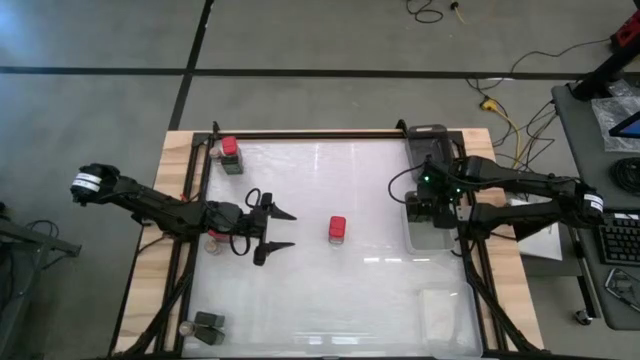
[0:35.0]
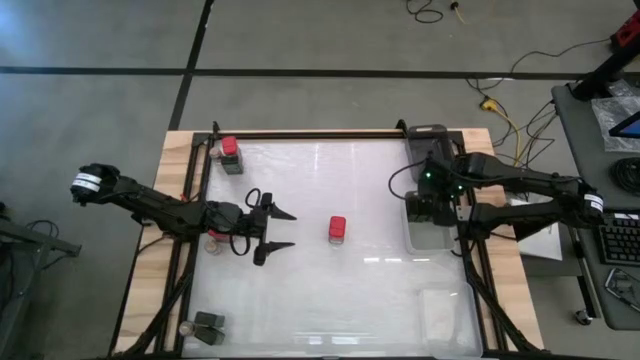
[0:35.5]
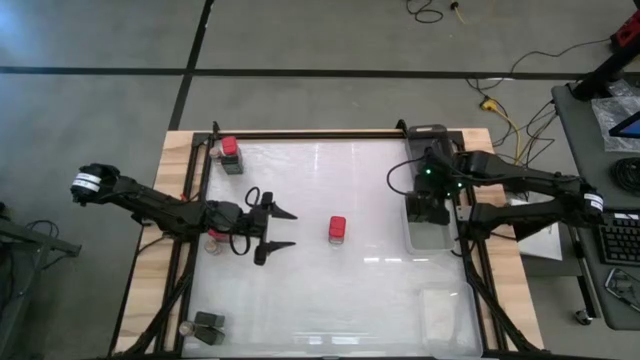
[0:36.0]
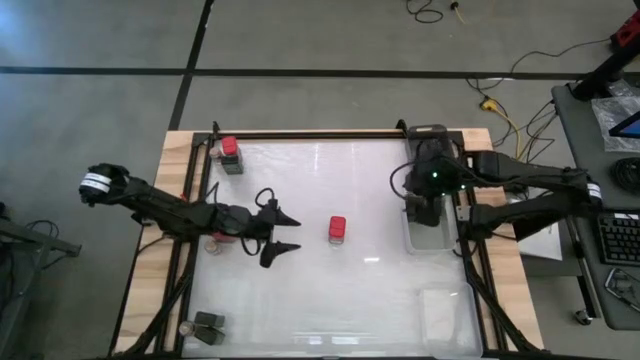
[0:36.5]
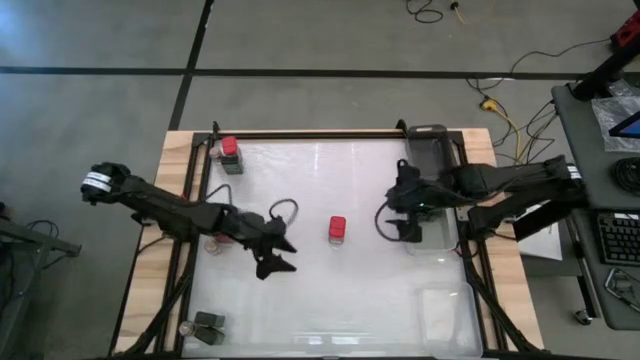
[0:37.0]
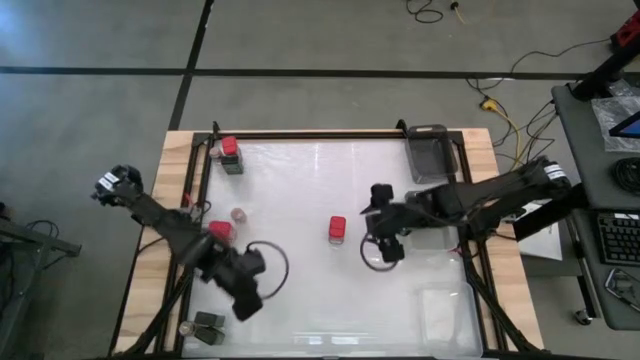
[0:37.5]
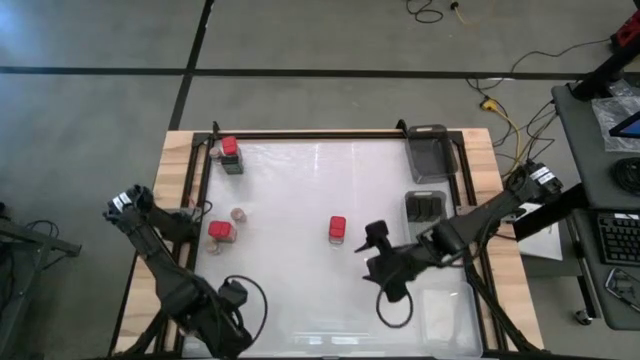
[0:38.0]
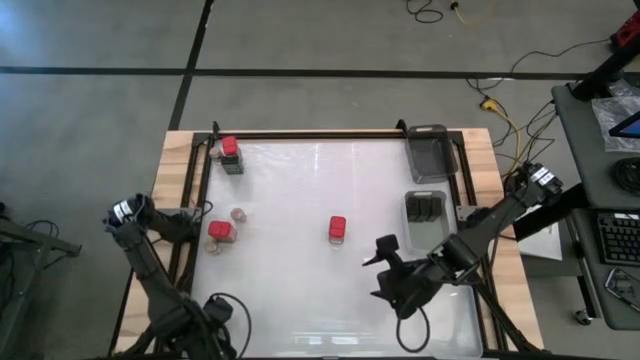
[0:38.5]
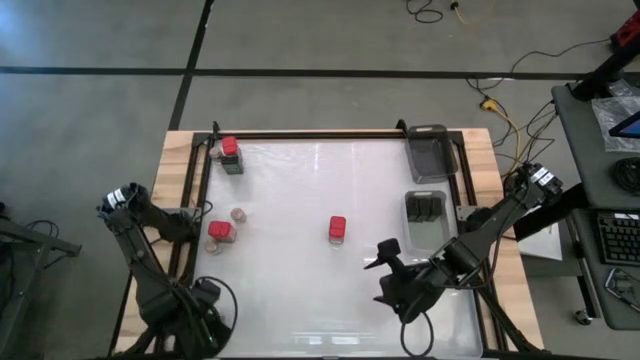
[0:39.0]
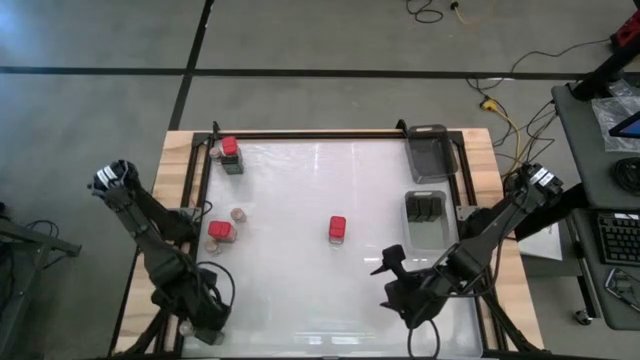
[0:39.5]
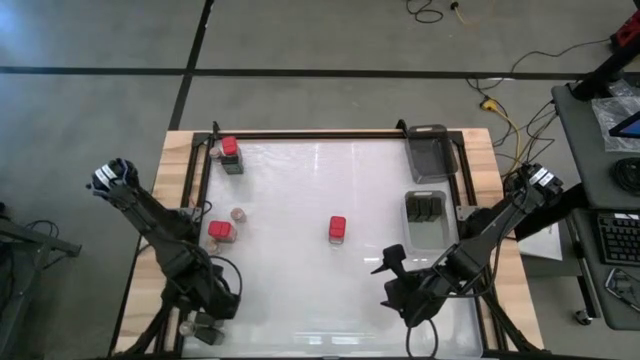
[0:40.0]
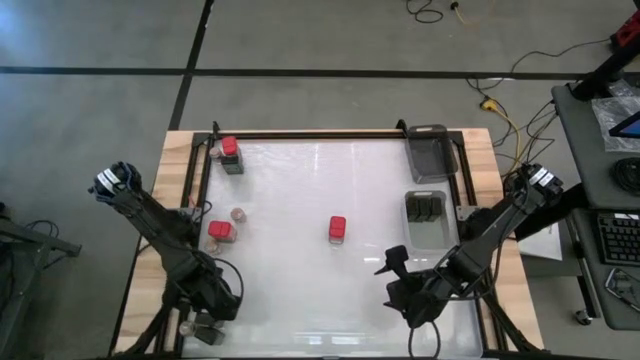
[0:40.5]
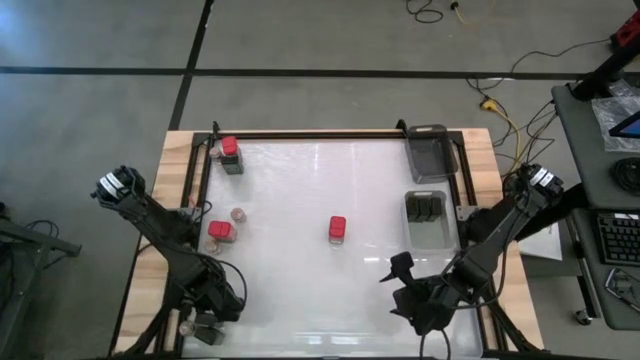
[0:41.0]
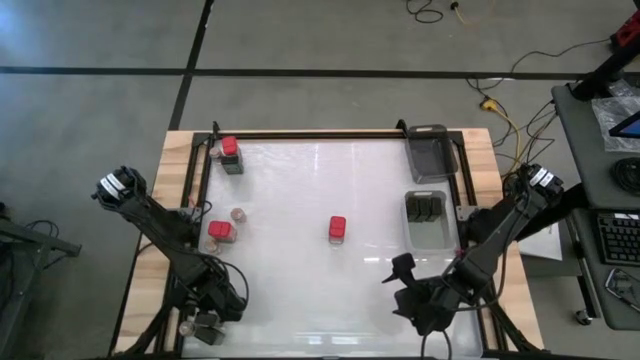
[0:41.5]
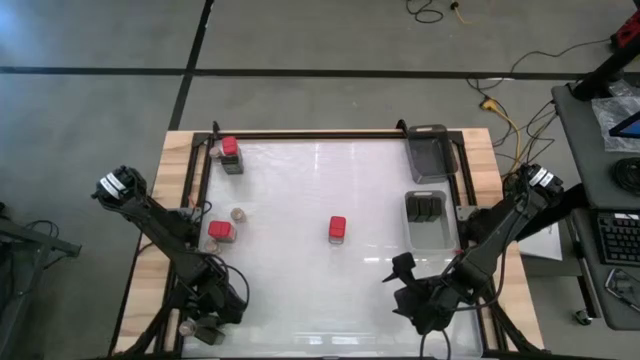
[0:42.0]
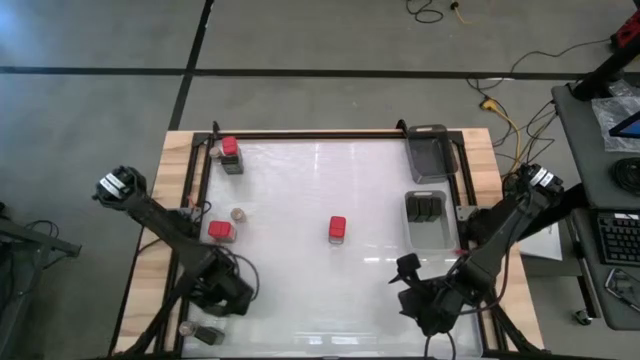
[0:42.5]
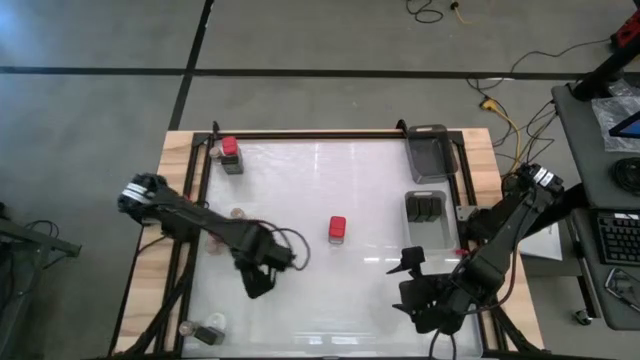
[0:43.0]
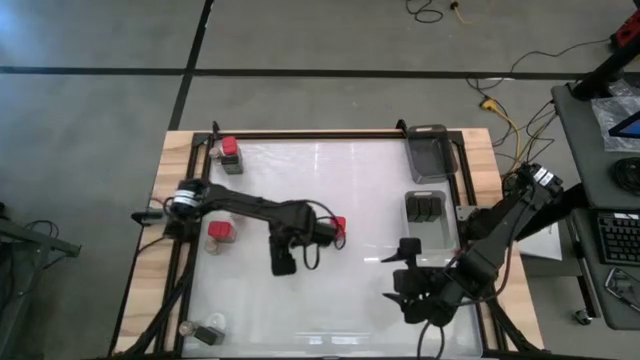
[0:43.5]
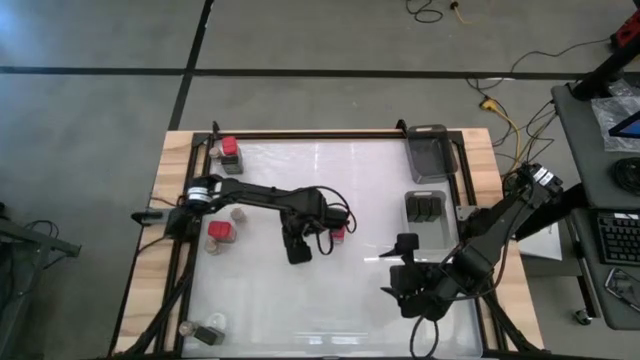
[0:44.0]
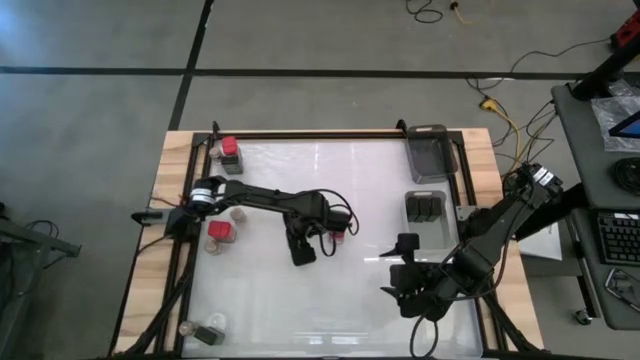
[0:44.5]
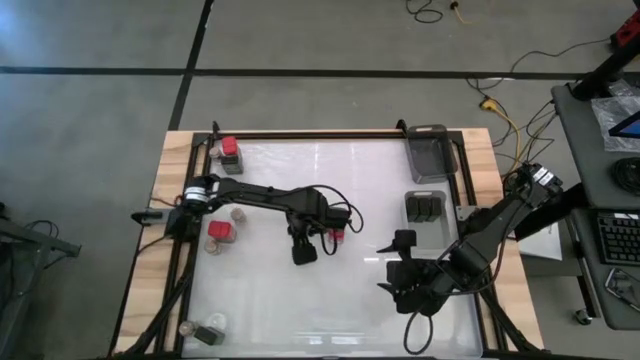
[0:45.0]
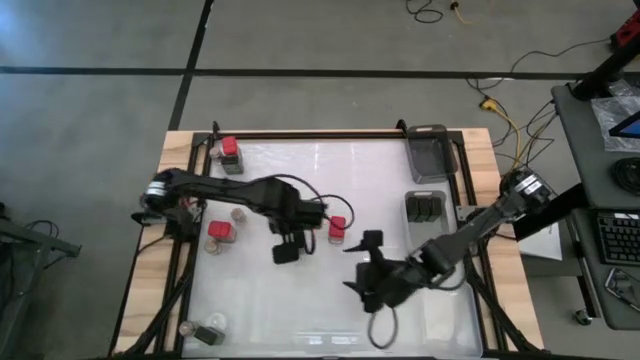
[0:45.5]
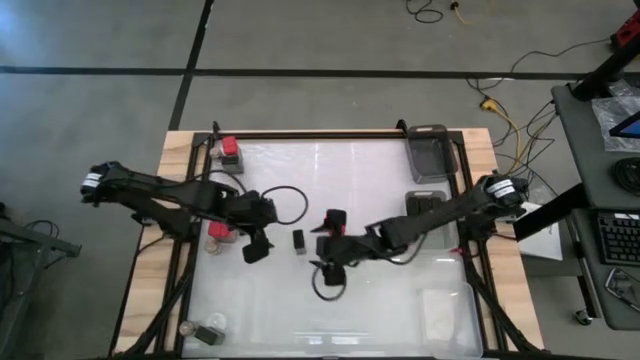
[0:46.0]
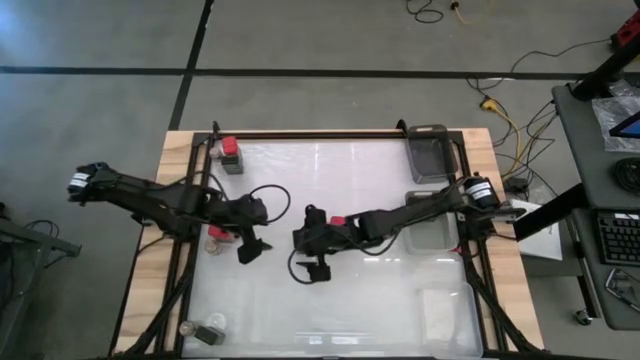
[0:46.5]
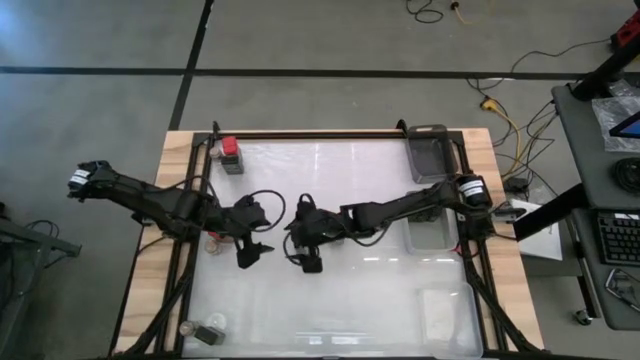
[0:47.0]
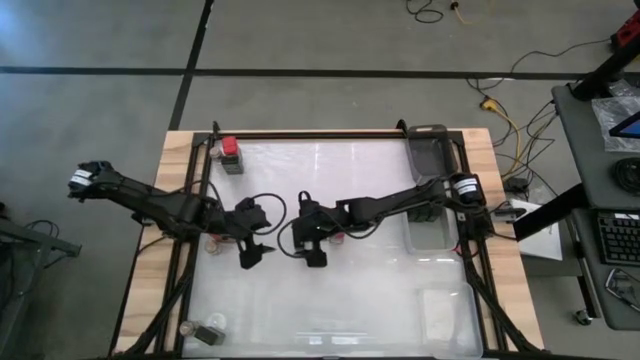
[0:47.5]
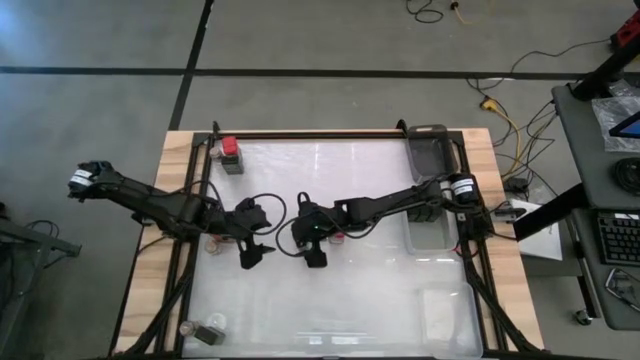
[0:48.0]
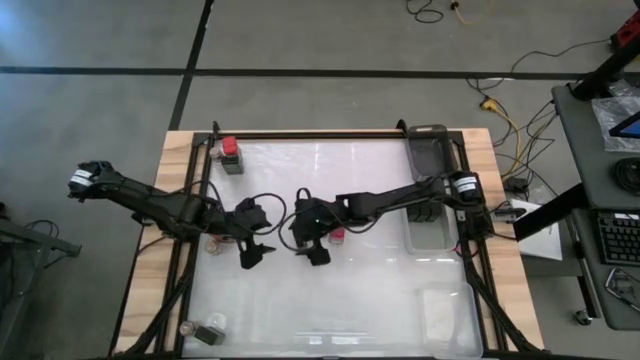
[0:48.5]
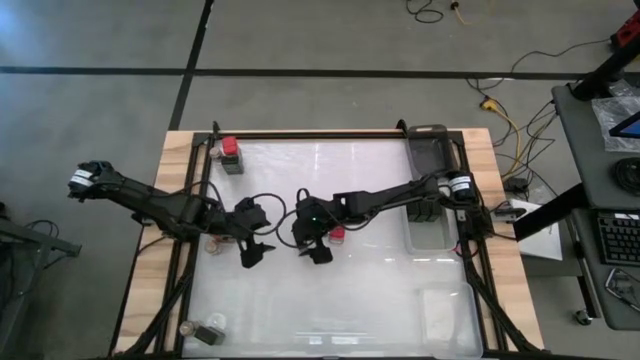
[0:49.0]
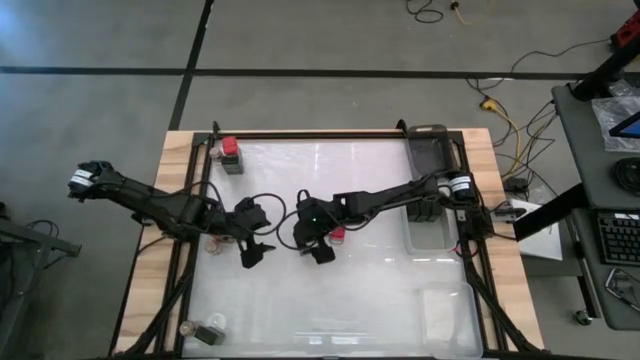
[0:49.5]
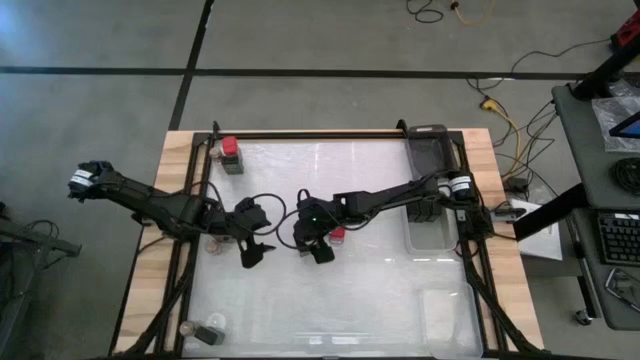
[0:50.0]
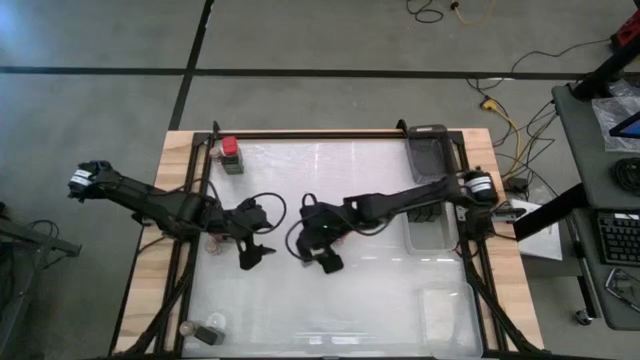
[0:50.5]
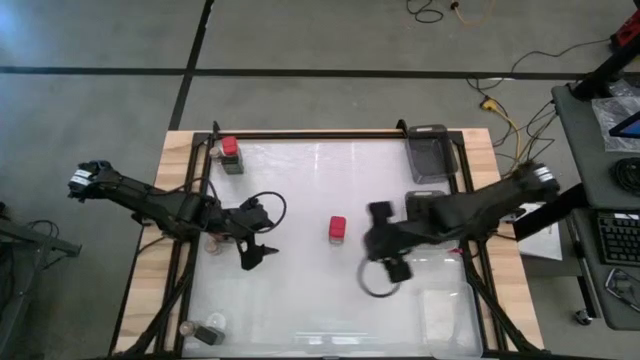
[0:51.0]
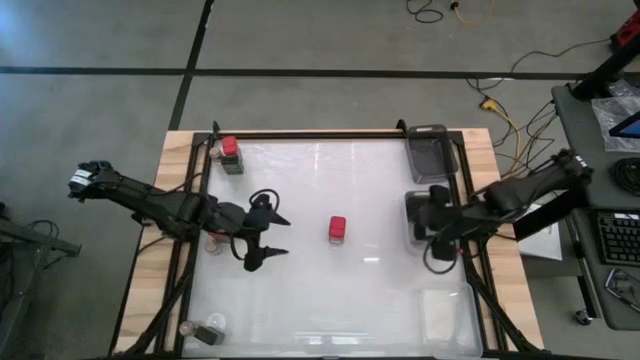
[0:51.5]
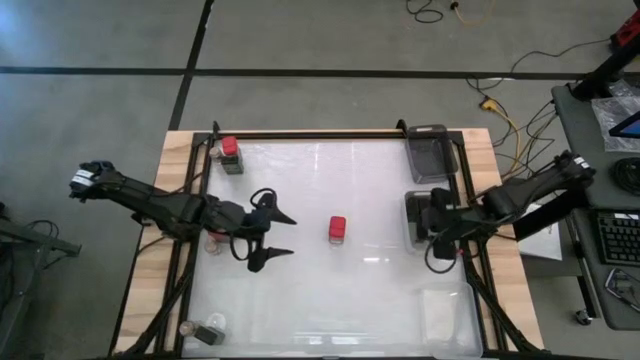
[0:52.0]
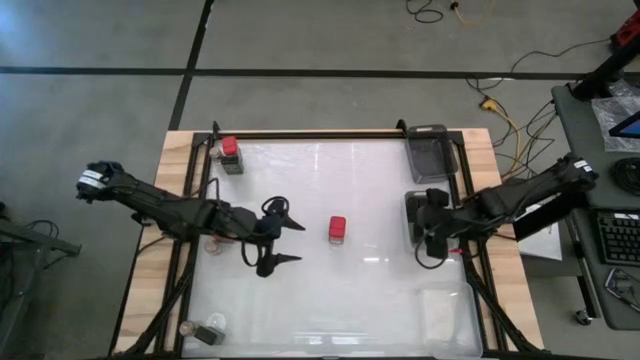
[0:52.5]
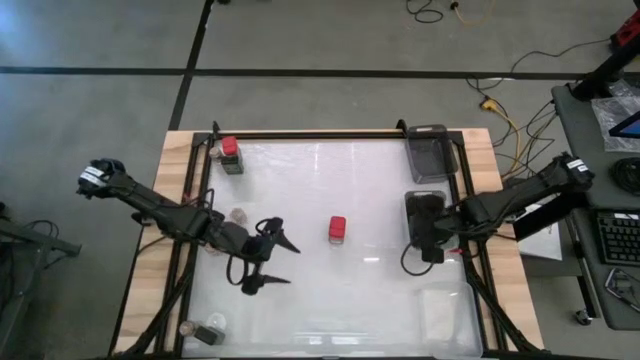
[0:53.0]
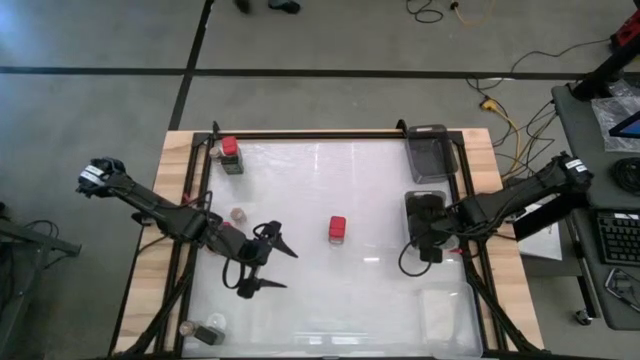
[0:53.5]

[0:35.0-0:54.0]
Task: Sort spices by type
Put the green seasoning can into the gray bin

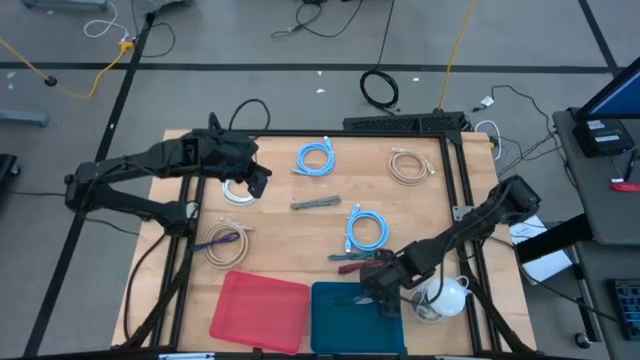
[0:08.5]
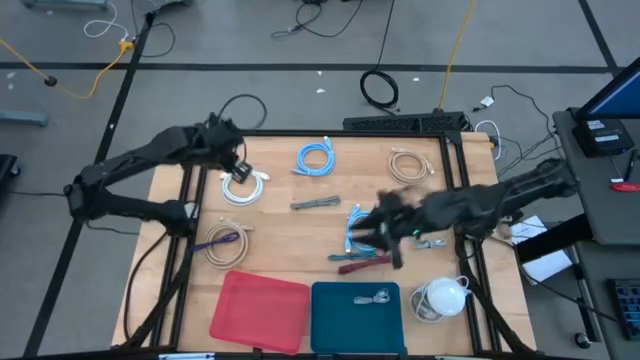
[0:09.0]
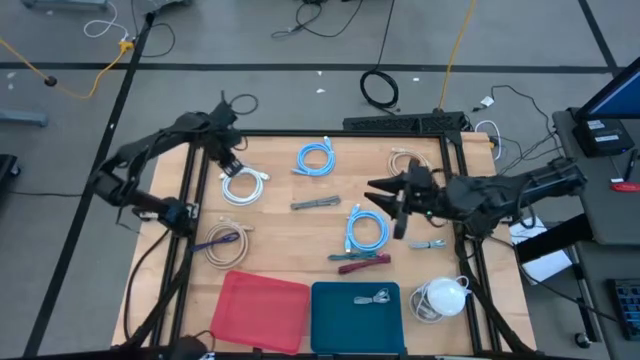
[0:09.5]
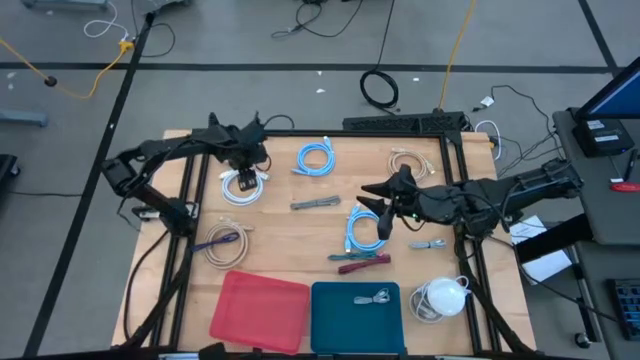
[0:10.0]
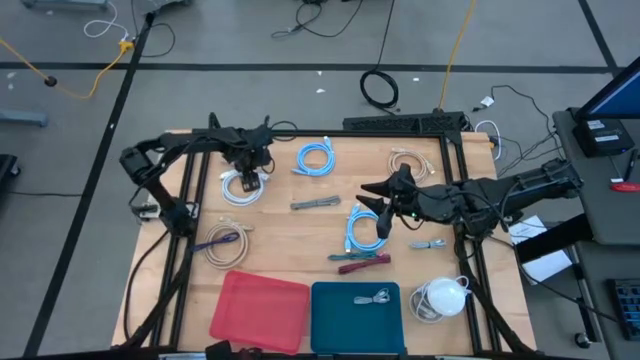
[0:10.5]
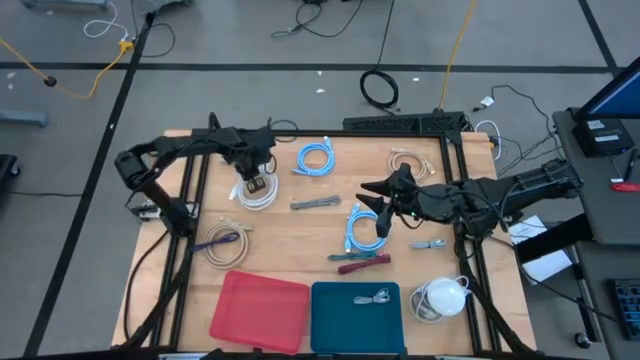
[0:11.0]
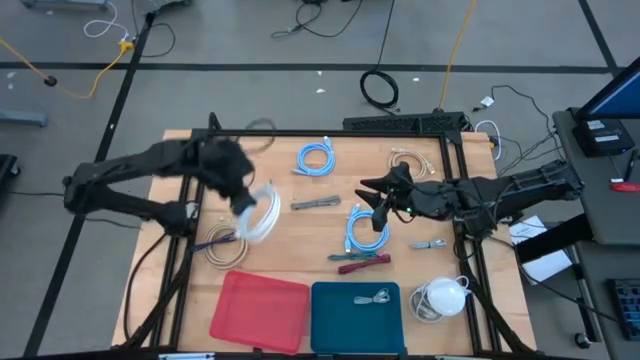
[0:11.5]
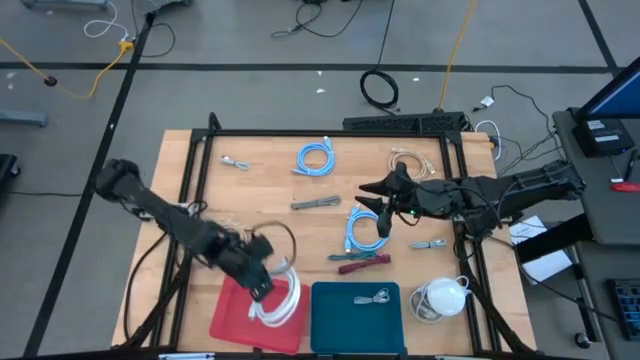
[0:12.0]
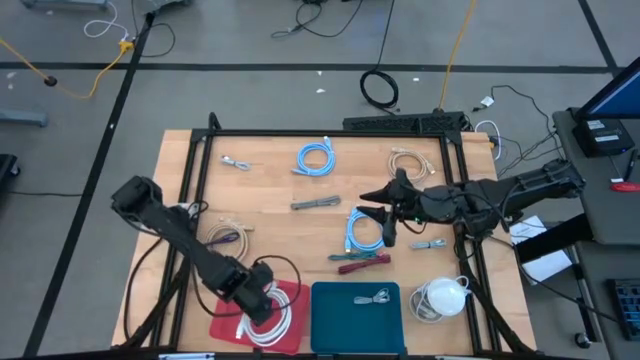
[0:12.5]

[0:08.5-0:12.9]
Task: Pick & Place USB Port
Put the white HDMI cable into the red bin
